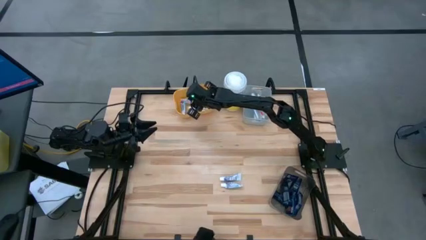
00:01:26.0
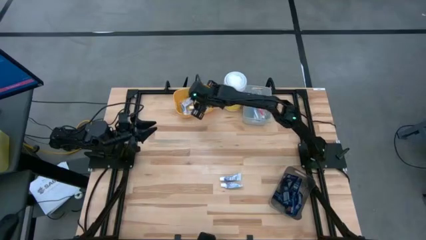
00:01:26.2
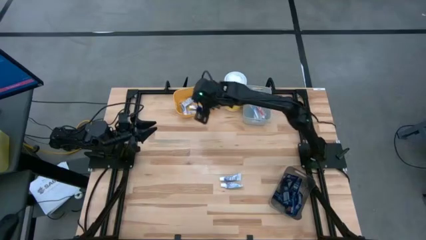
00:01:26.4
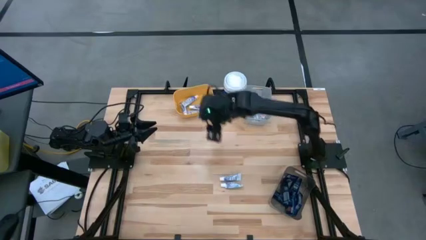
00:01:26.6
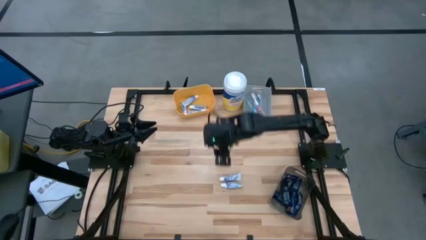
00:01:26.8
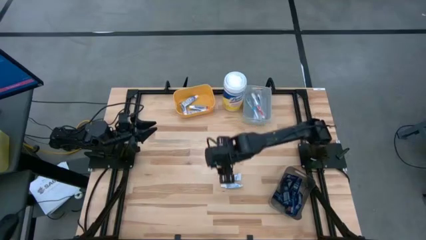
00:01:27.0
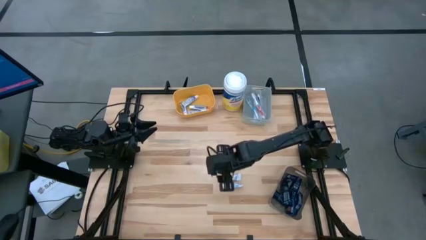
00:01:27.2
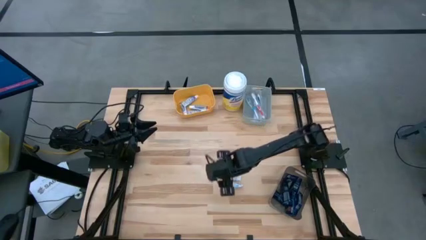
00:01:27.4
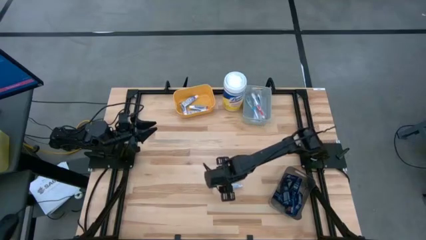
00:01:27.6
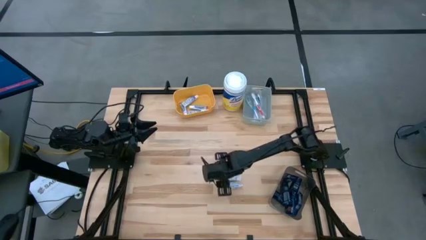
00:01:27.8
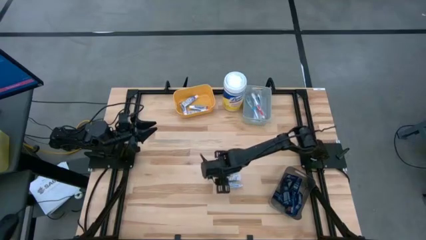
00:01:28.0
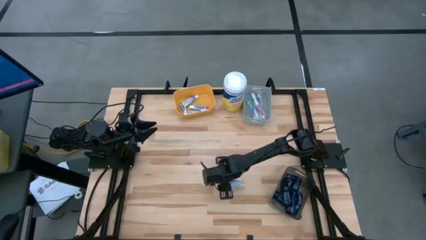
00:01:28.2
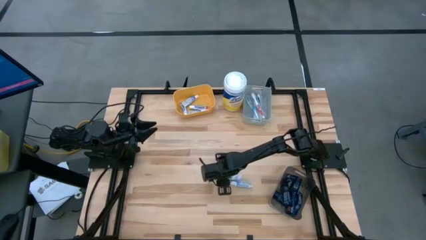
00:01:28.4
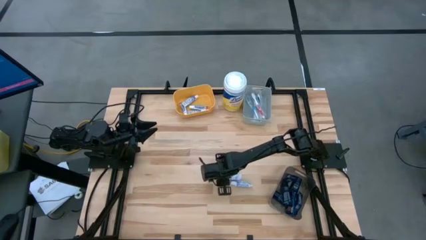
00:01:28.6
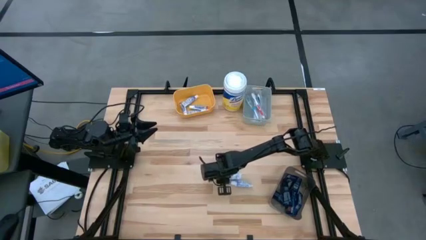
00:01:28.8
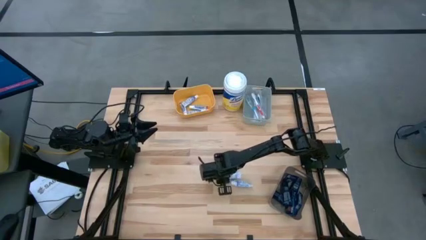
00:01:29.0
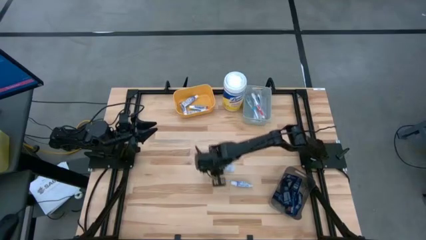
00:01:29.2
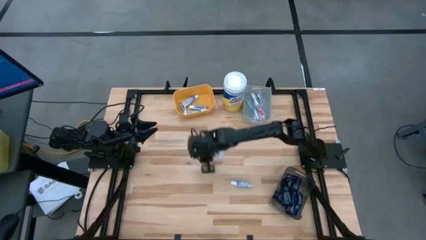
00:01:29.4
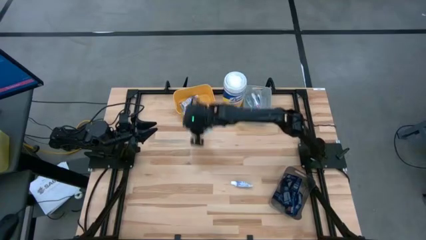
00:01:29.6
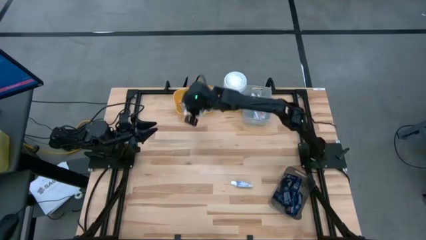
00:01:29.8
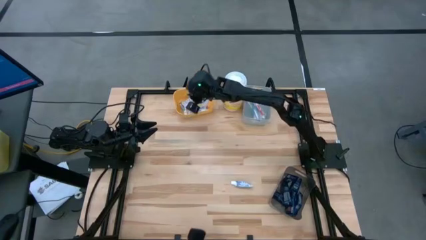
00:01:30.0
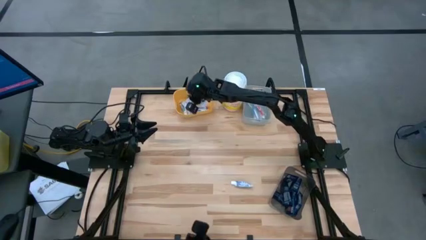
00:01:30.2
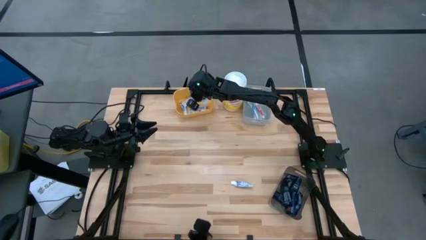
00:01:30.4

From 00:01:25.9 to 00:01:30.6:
Task: Pick & Place Travel size toiletries
Put the violet toothpaste into the yellow bin

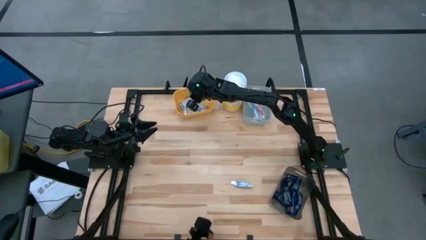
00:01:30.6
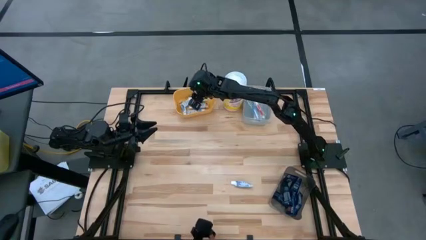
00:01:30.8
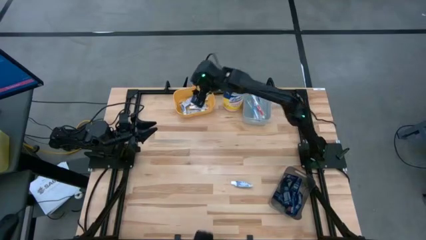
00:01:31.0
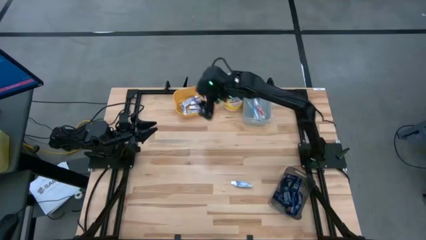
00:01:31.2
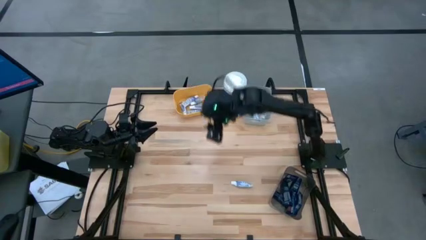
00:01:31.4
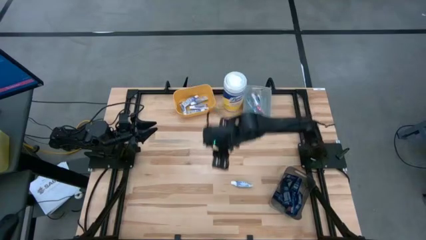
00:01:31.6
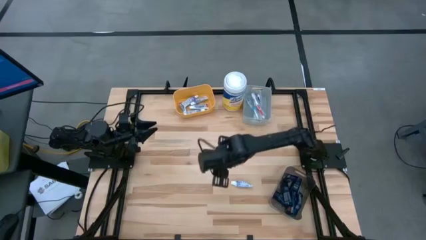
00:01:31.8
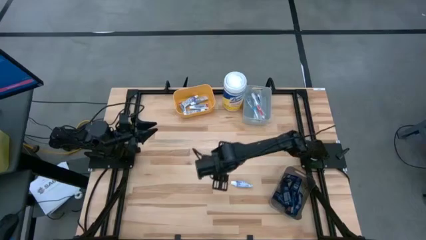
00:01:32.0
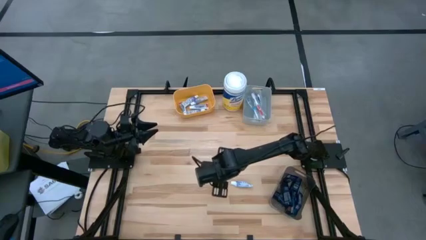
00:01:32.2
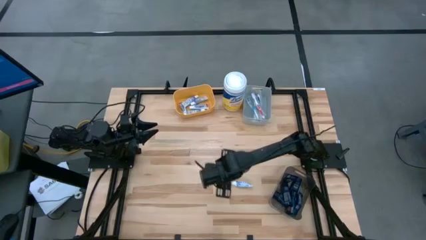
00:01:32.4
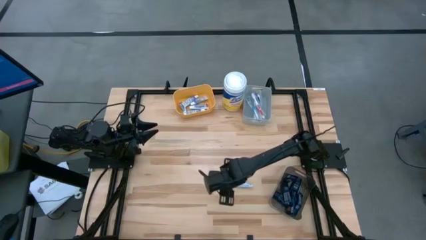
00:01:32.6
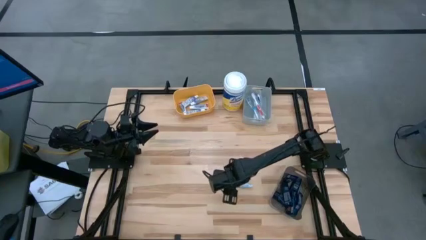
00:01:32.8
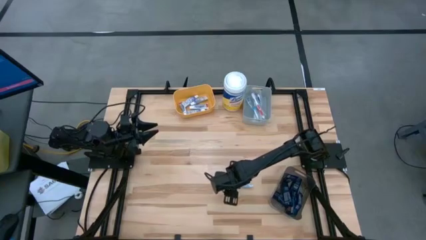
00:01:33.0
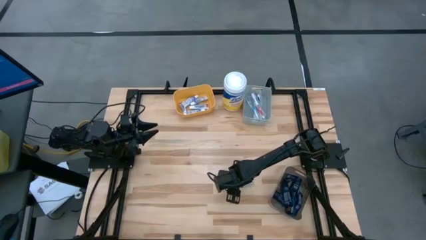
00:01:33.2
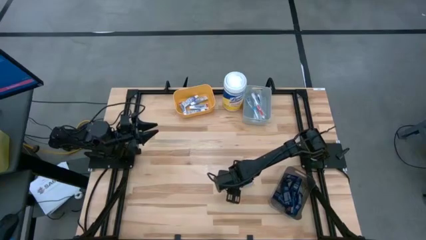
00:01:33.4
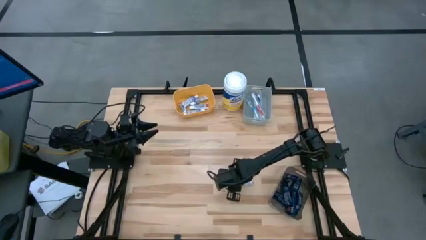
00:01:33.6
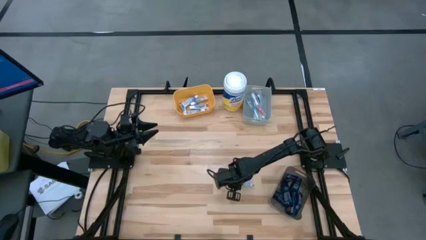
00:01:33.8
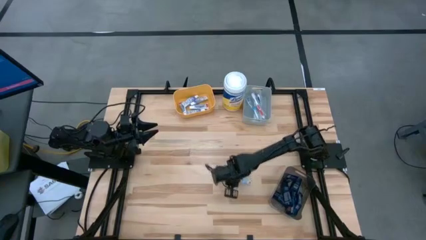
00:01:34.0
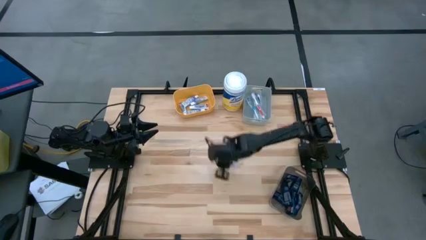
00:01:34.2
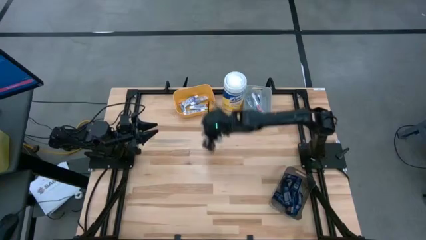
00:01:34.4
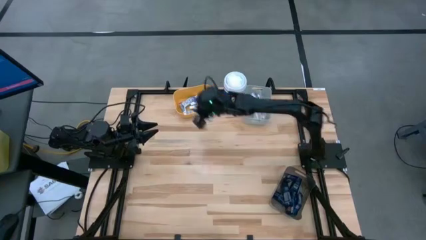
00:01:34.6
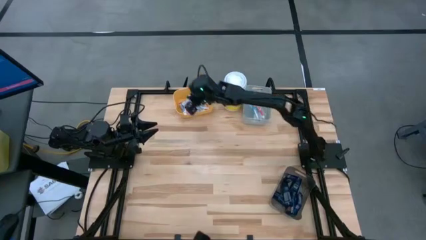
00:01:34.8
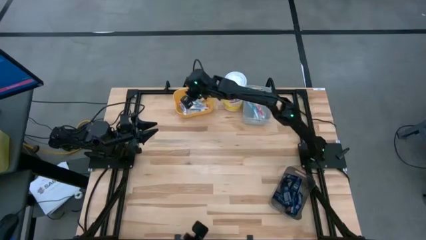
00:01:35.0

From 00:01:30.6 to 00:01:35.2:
Put the violet toothpaste into the yellow bin

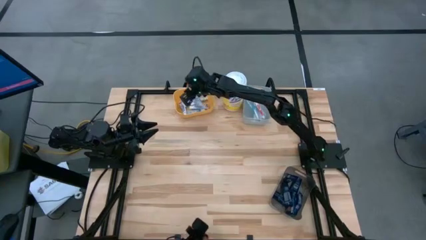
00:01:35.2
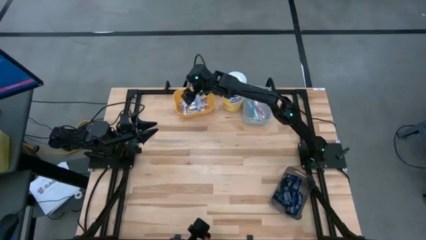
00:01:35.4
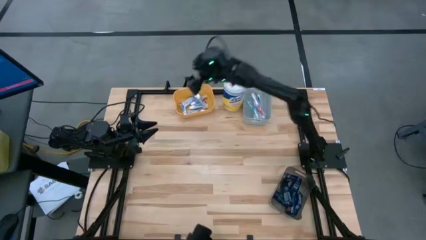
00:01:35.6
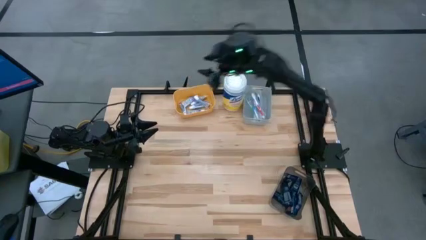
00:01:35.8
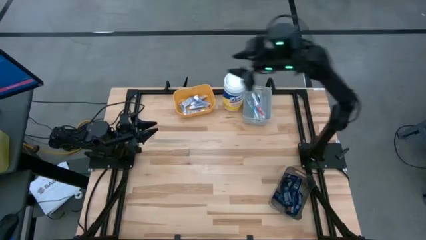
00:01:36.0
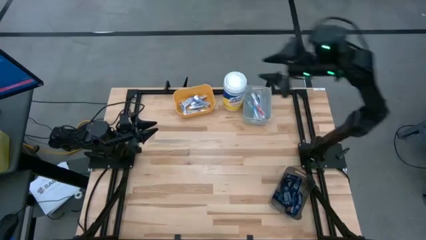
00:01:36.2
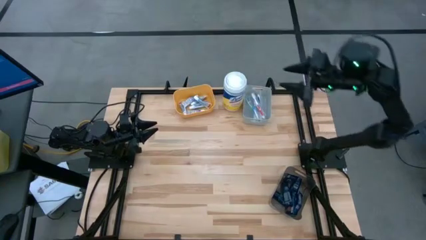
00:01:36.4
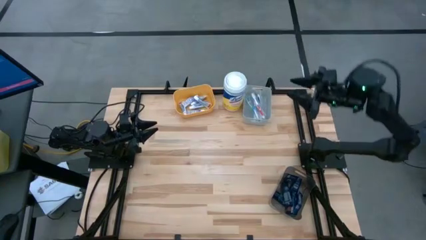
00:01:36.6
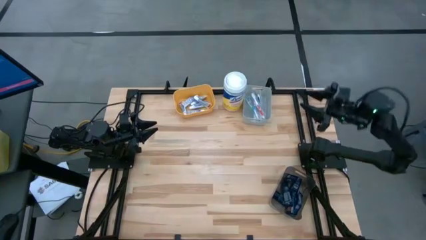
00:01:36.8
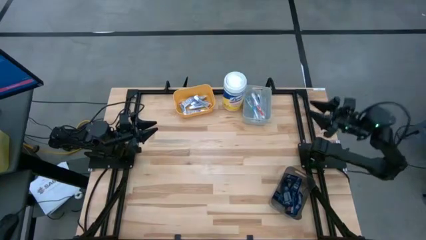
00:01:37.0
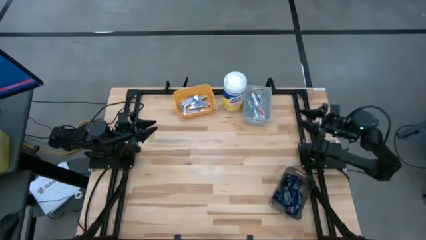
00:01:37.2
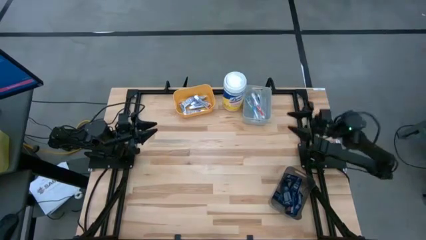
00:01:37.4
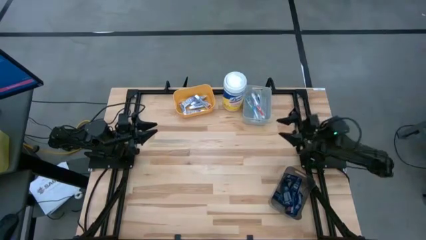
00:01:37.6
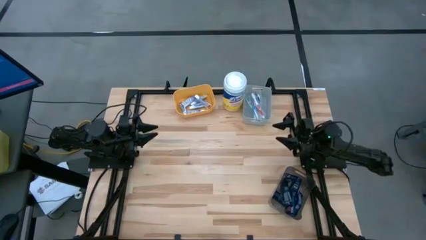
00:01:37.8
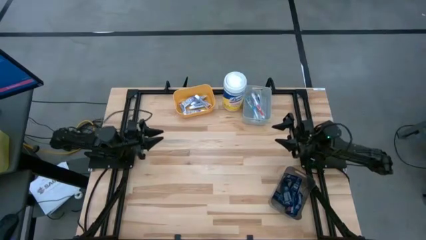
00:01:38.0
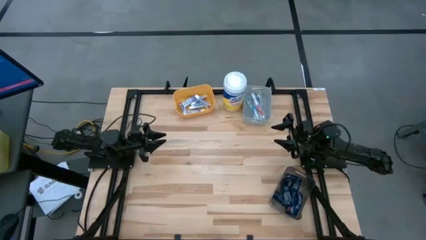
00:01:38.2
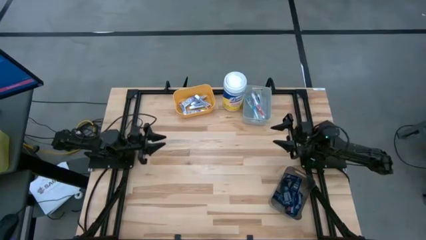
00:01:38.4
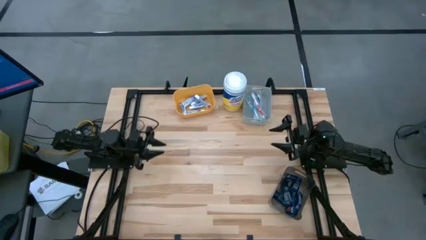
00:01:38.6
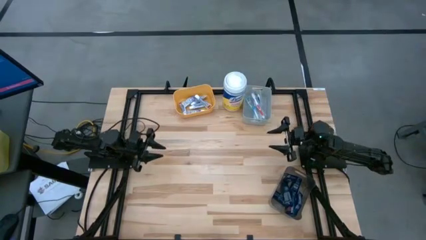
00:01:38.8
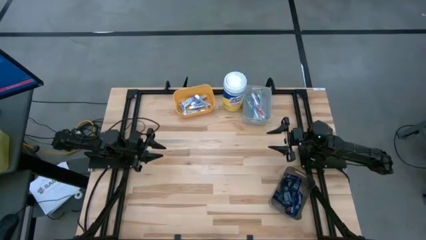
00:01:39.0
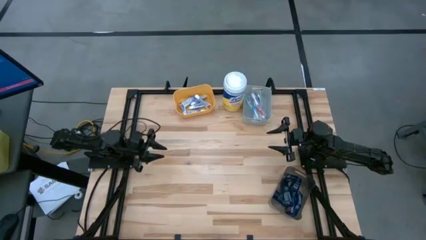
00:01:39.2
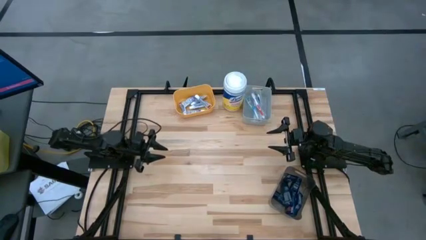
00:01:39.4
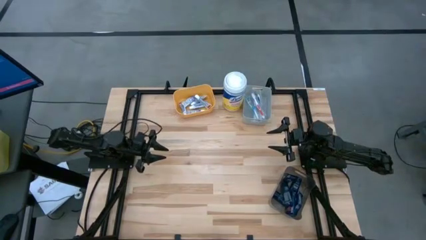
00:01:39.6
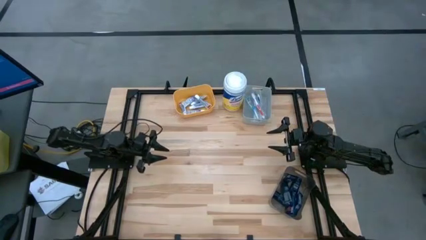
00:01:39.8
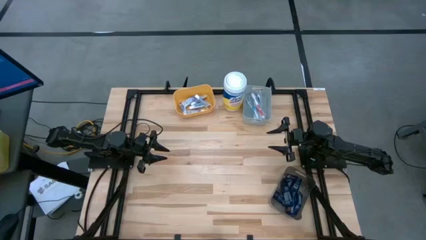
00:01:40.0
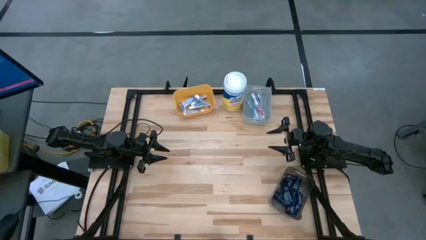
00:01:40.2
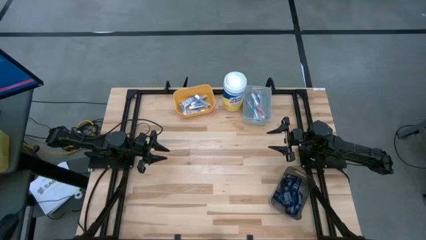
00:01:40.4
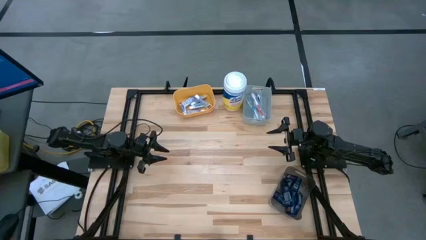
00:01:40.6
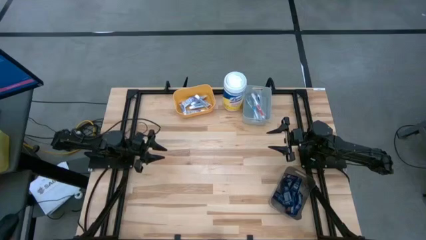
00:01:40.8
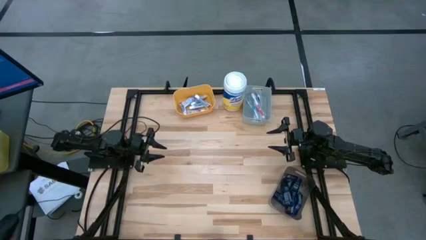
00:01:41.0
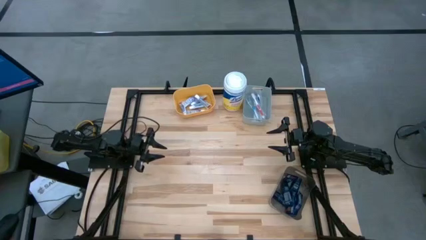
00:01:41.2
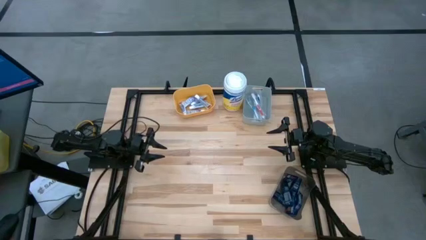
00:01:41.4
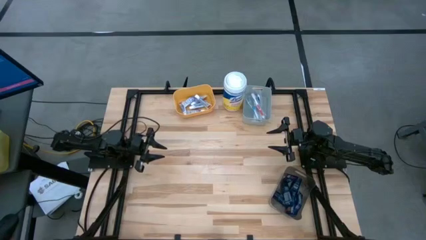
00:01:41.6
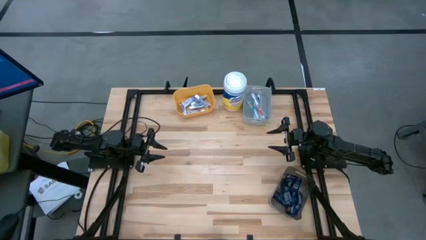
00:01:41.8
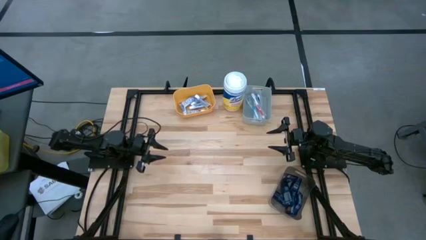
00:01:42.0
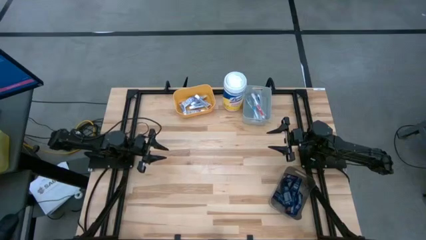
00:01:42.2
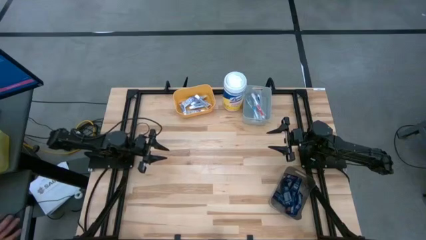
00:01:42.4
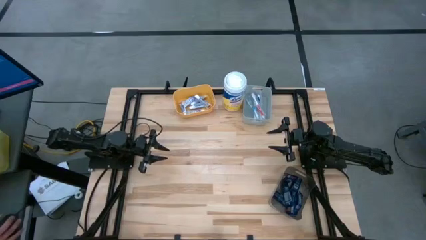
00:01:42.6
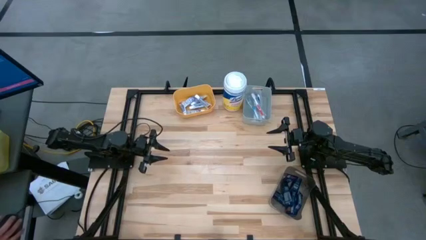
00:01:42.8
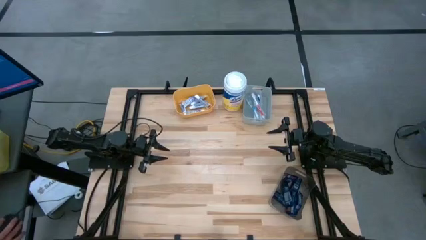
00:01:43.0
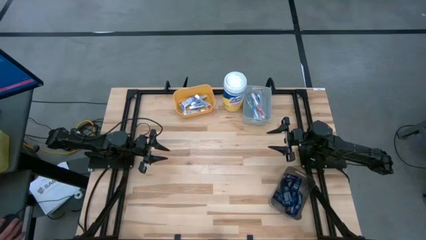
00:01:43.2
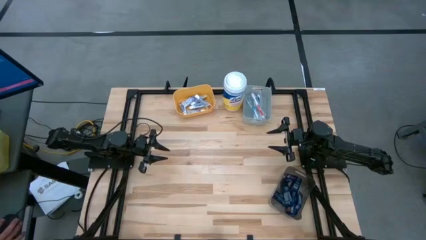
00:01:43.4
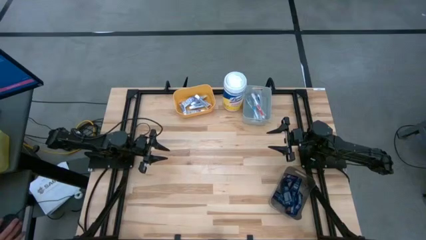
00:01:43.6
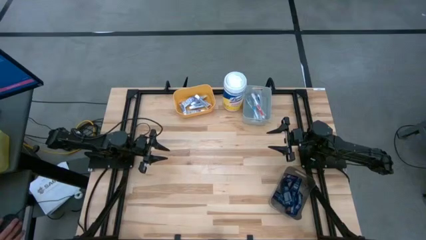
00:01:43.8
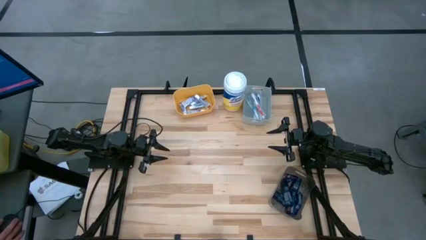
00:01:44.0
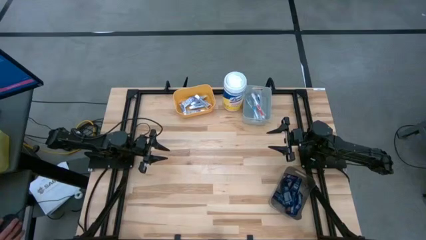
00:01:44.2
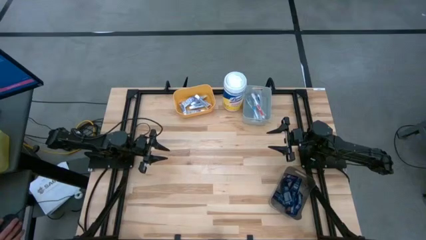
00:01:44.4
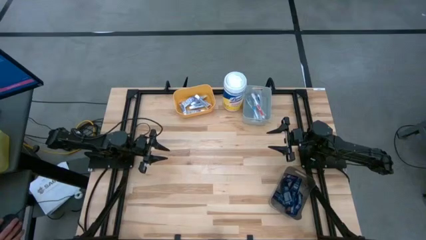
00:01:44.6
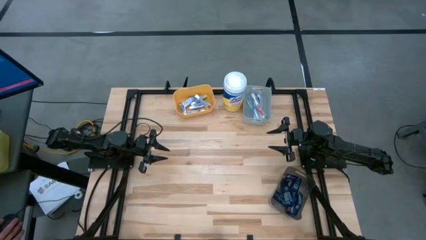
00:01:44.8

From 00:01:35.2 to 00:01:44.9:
Return to Home Position
